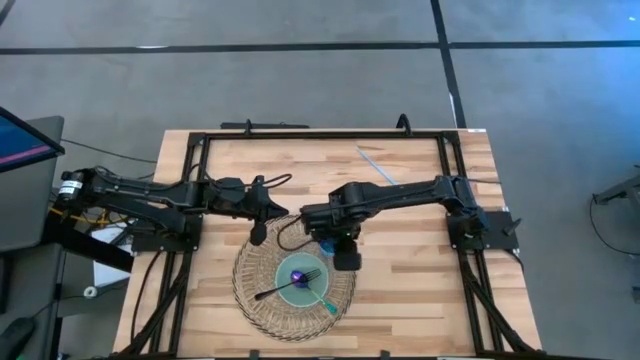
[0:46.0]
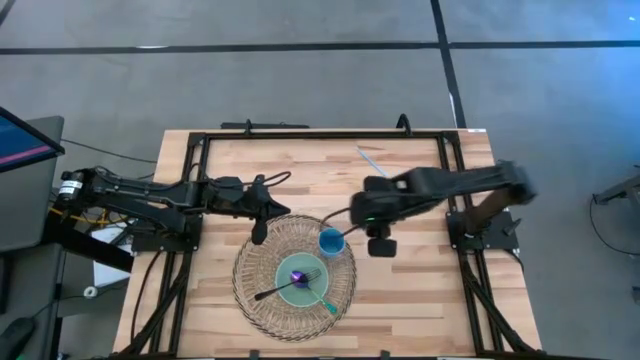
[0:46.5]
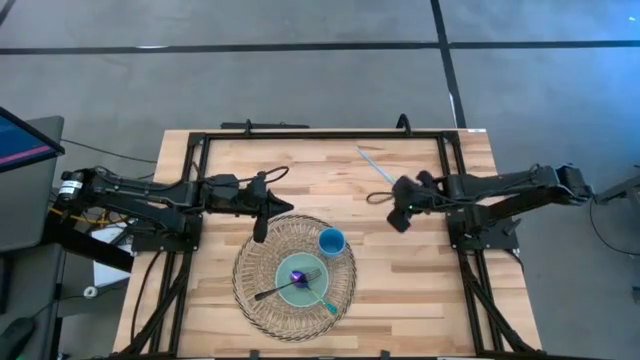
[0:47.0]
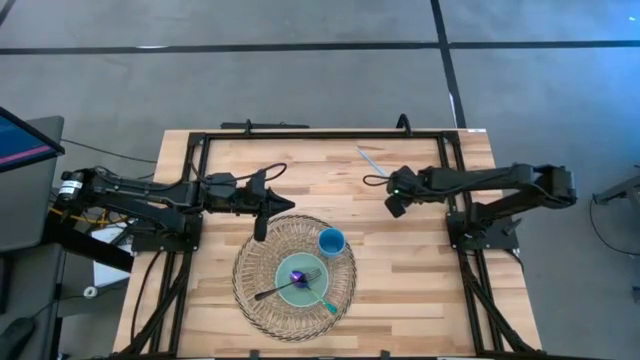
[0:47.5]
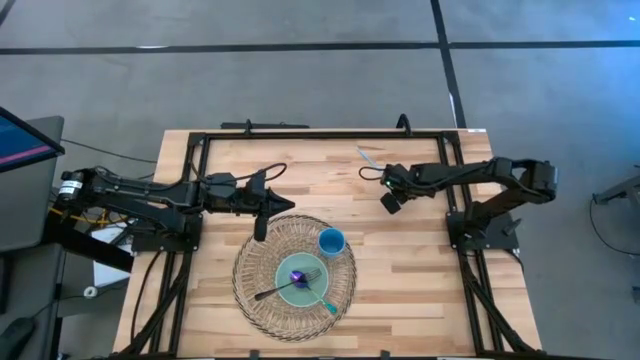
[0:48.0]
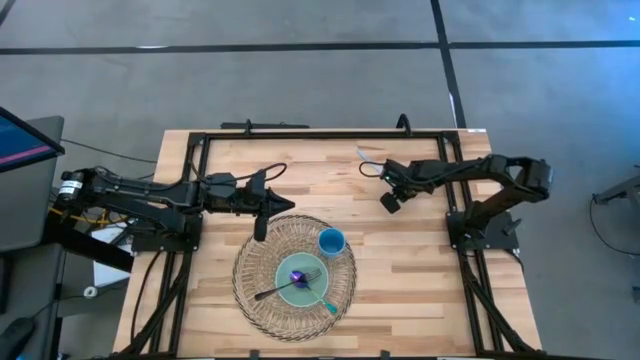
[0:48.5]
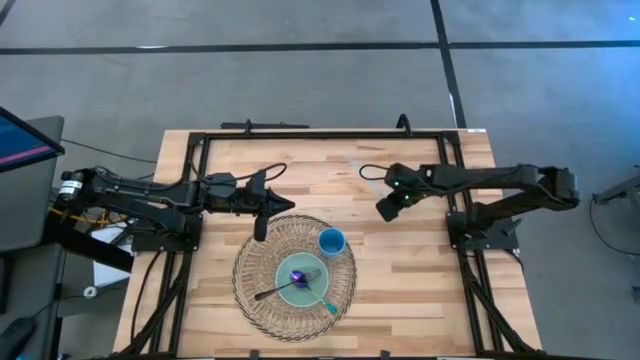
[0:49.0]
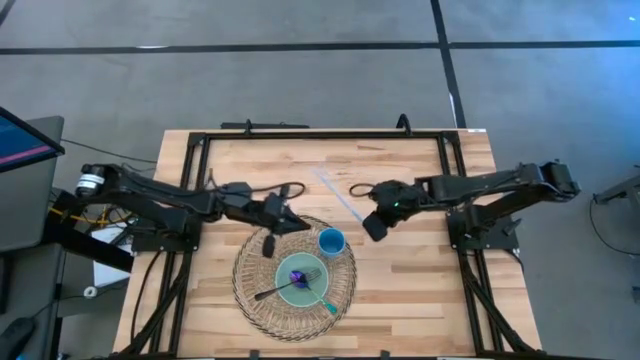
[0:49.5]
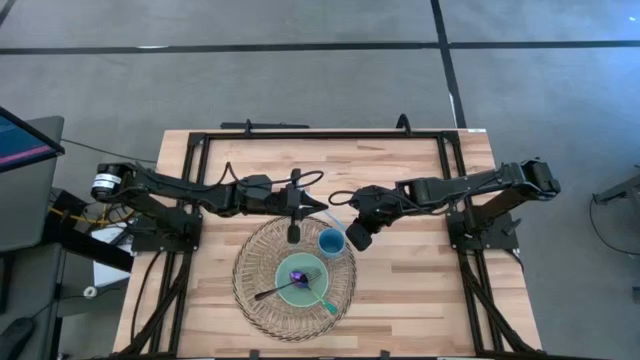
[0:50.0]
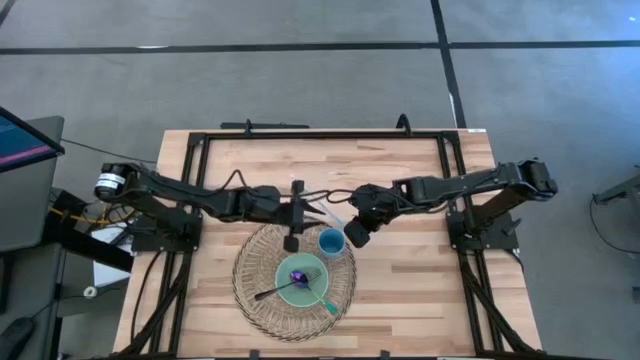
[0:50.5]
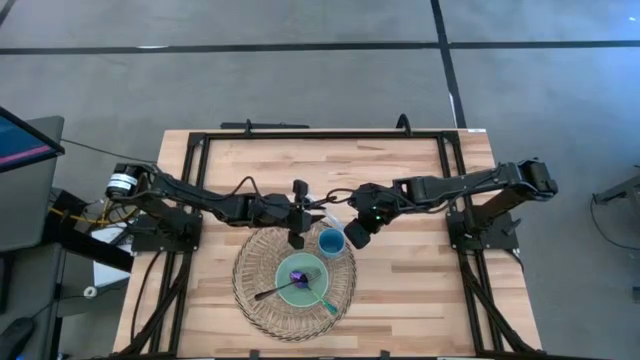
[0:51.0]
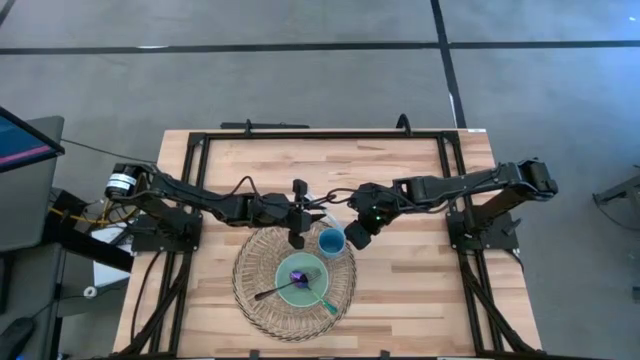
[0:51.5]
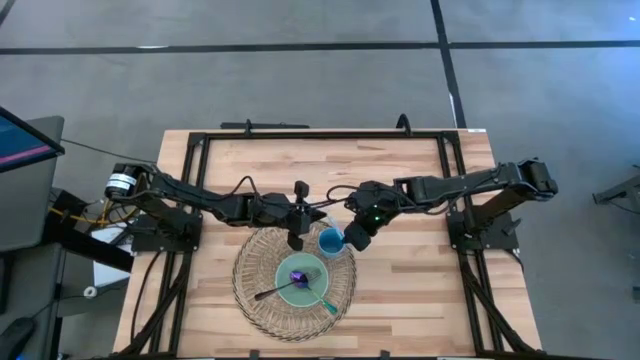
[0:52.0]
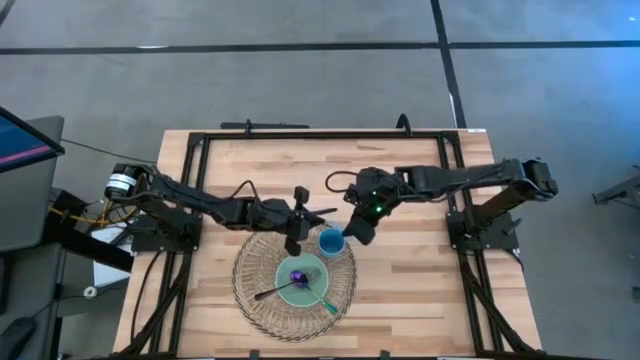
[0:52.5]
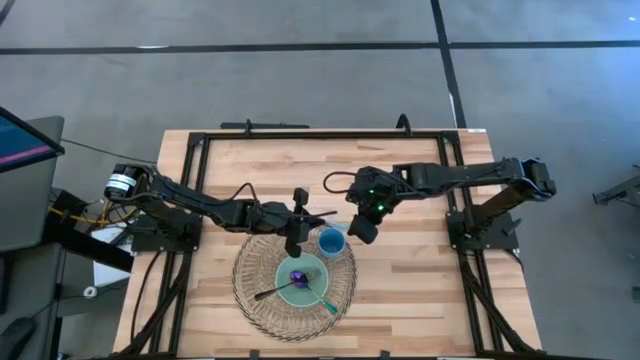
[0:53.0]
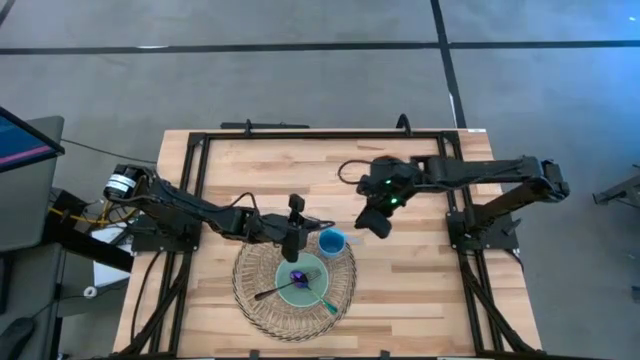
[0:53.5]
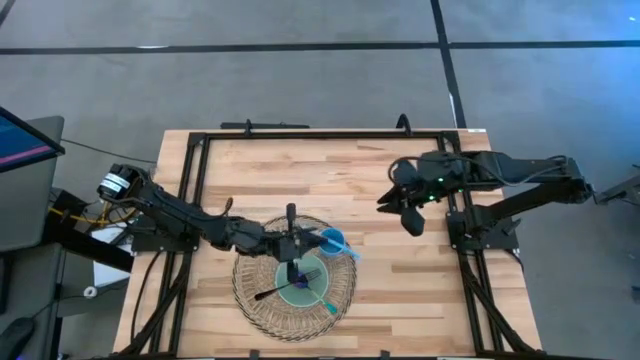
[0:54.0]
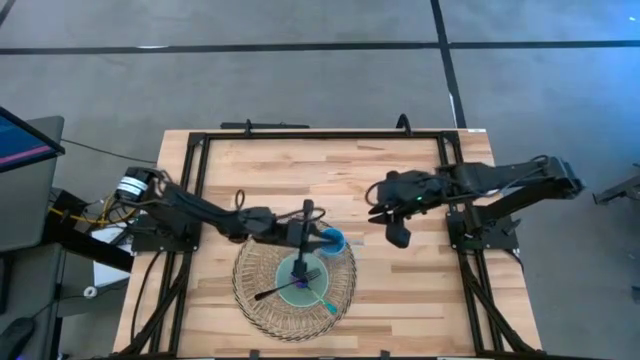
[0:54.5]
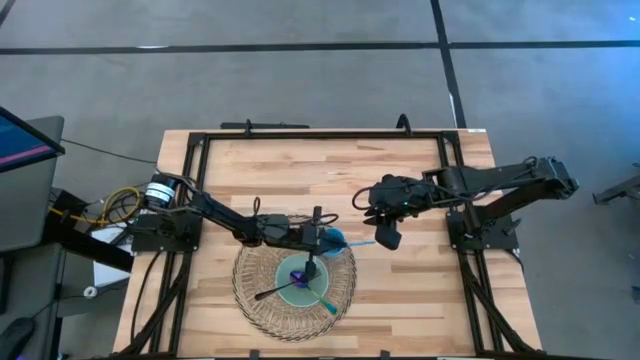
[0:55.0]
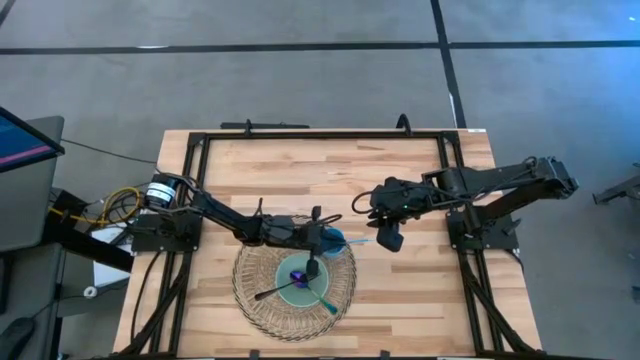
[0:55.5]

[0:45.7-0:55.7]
Task: Pick & Place Utensil
Put the blue straw into the blue cup on the woven placemat

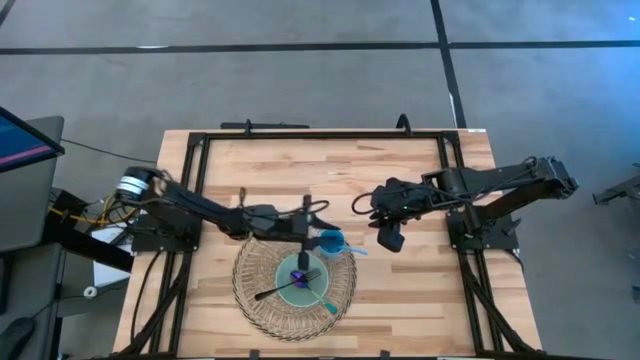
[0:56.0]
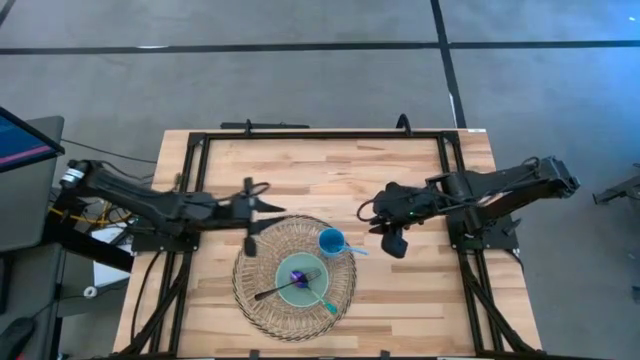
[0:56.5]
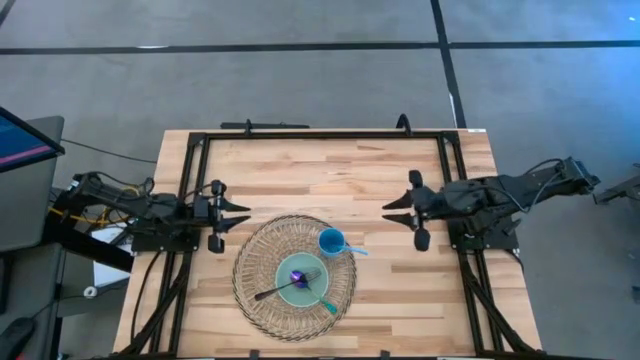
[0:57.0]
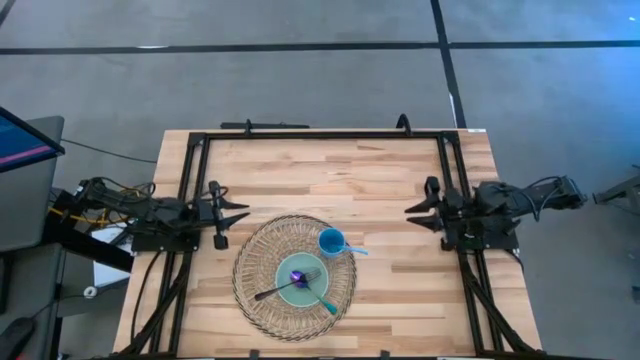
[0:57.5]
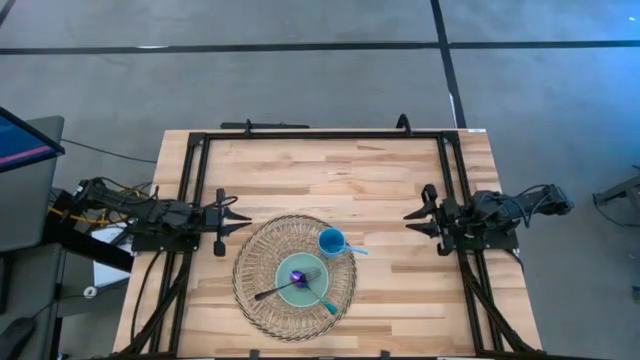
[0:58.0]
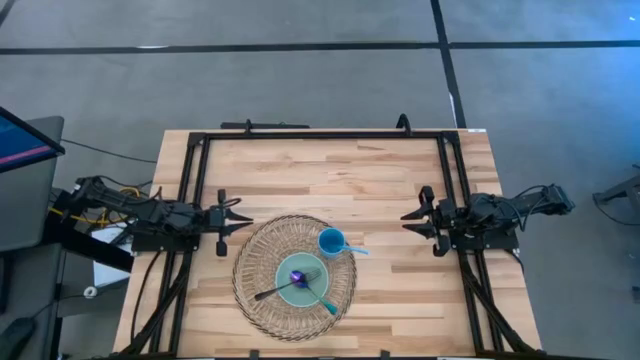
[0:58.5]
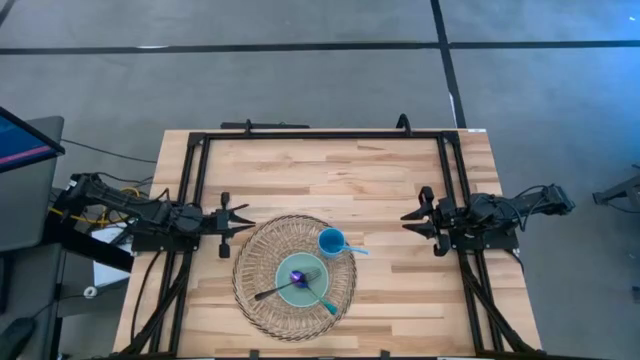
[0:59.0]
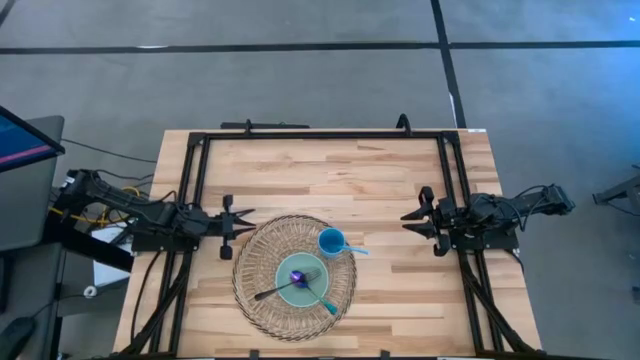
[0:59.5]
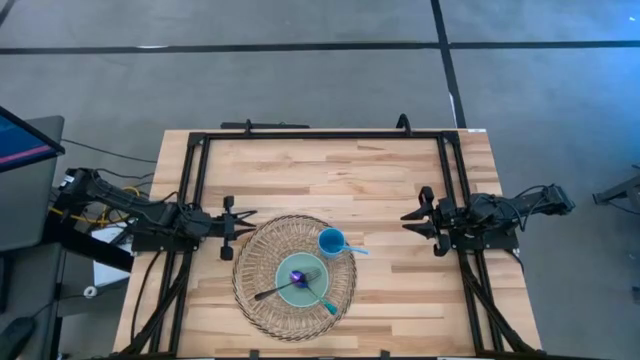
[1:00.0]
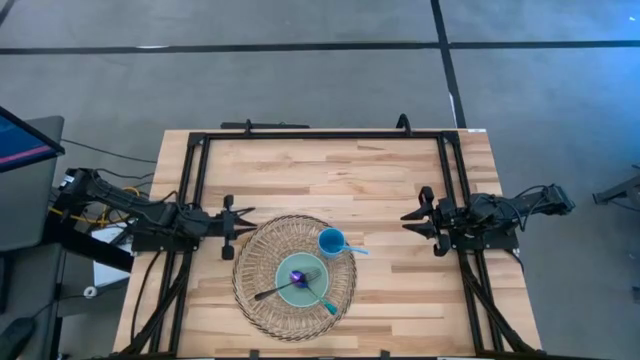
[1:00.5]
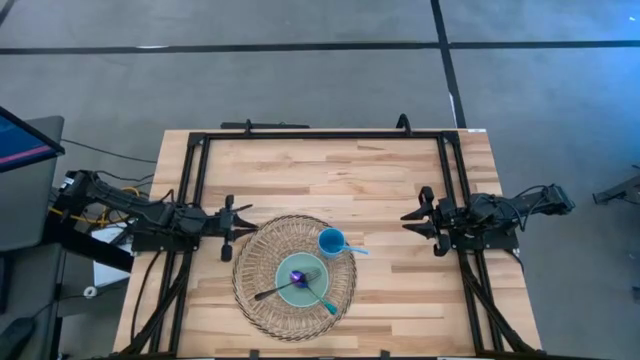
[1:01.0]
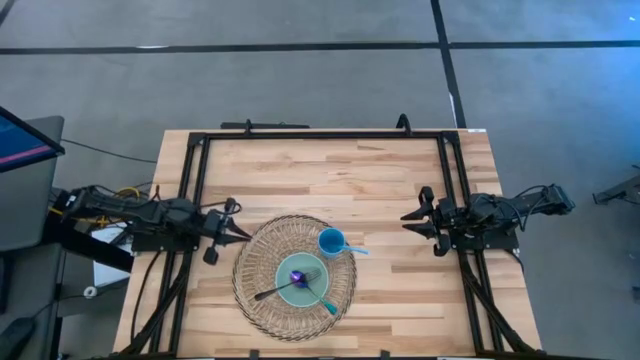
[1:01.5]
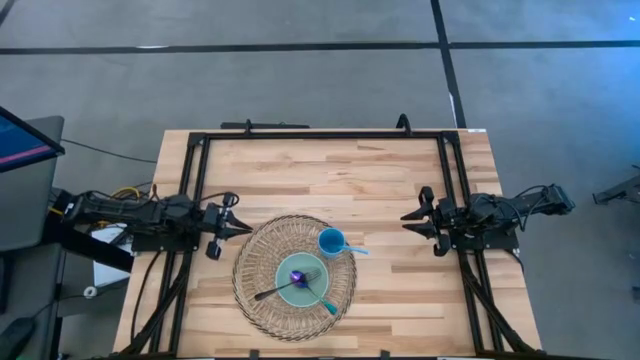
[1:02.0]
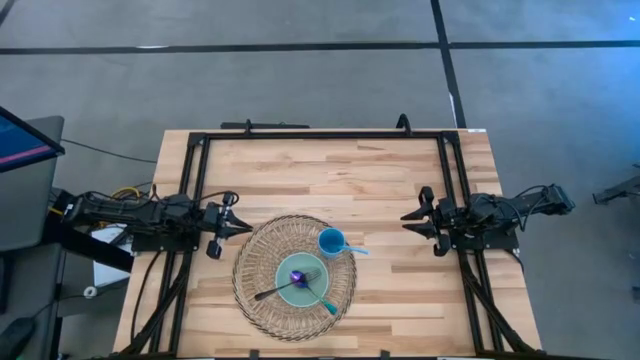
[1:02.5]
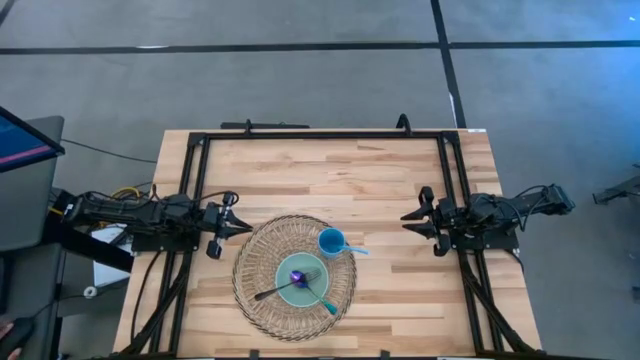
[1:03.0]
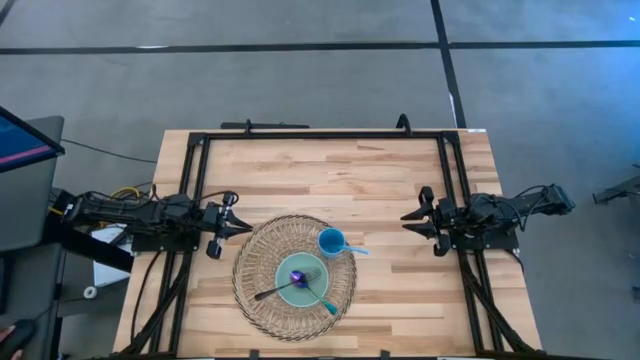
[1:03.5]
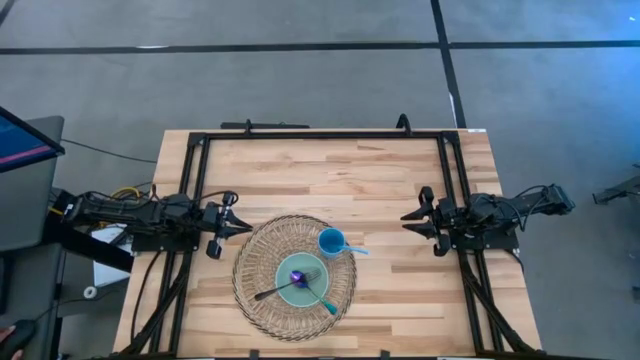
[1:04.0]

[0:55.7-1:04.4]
Return to Home Position

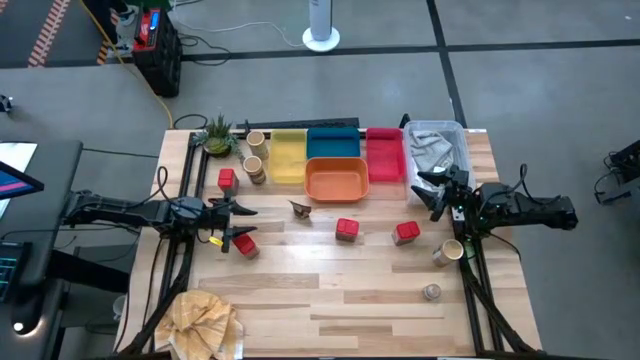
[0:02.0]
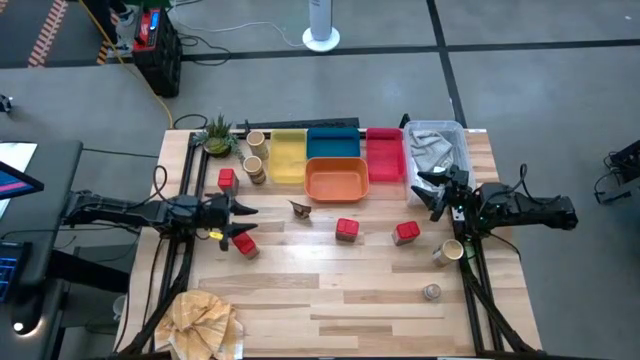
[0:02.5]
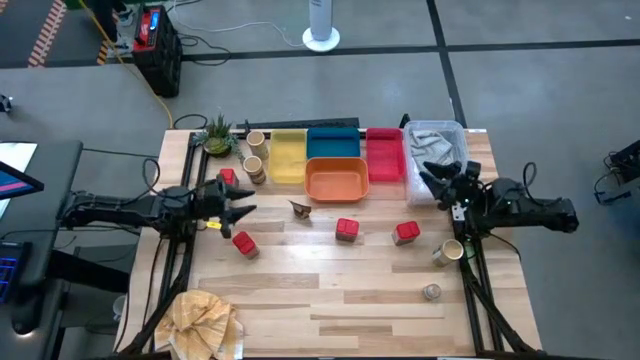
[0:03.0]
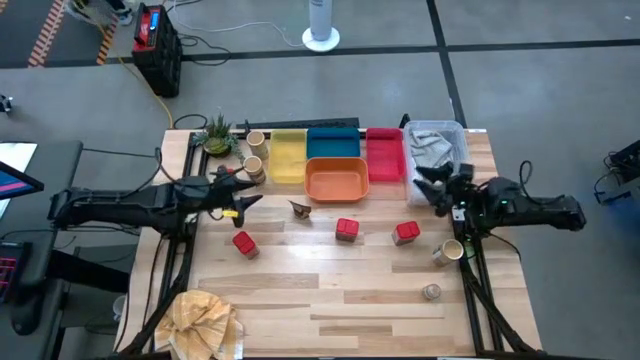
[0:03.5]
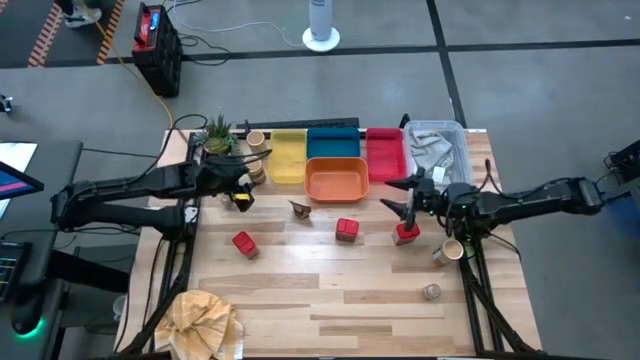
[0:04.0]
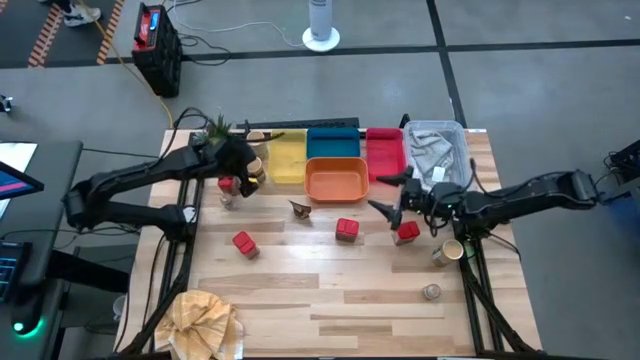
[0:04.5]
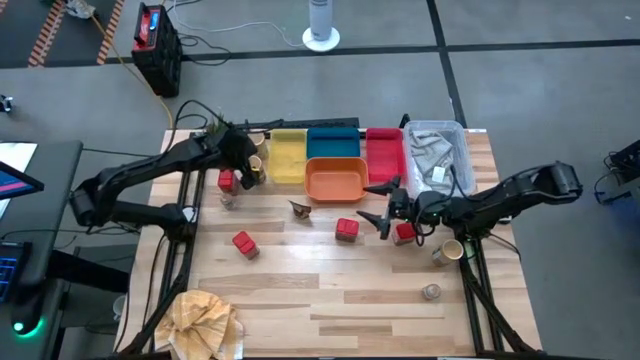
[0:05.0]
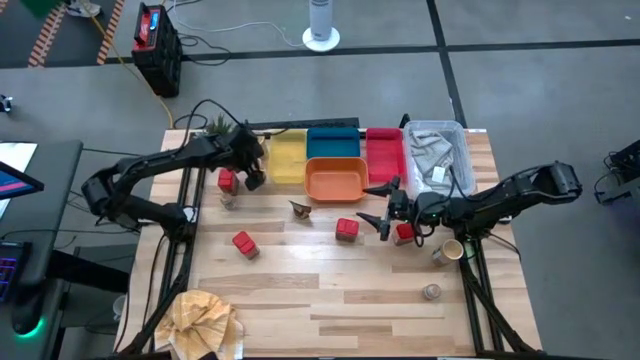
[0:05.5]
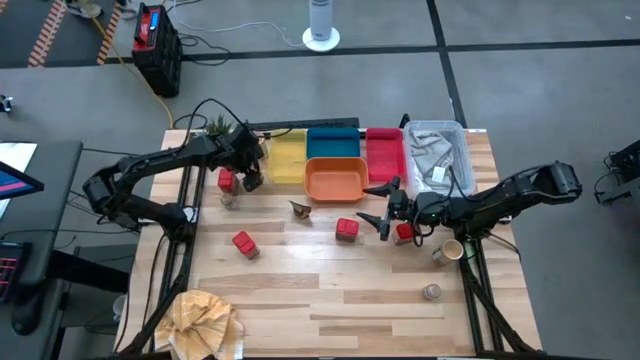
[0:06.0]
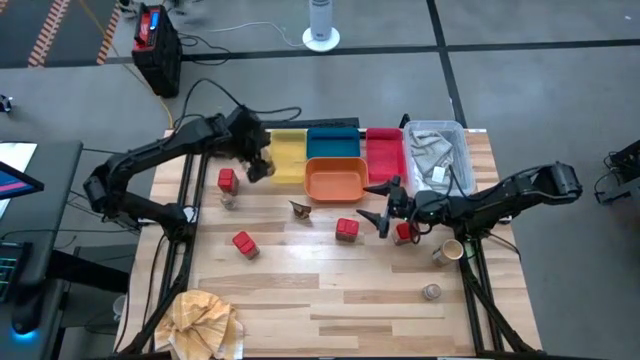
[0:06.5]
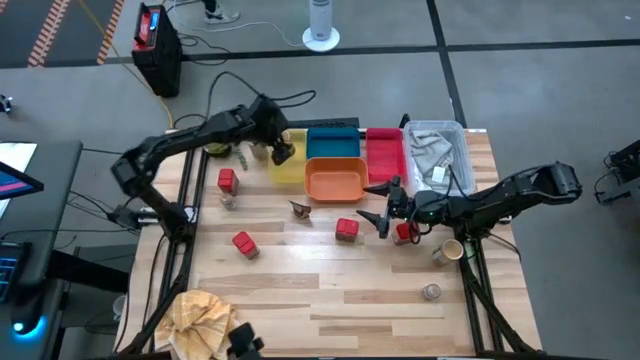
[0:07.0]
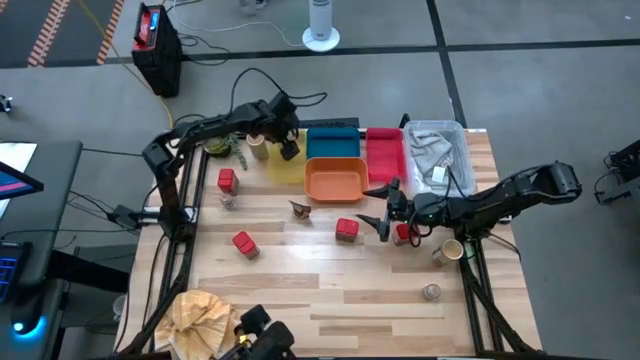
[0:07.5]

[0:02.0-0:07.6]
Task: Sort spices by type
Put the gold seasoning bottle into the yellow bin
